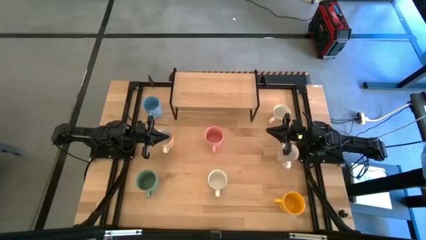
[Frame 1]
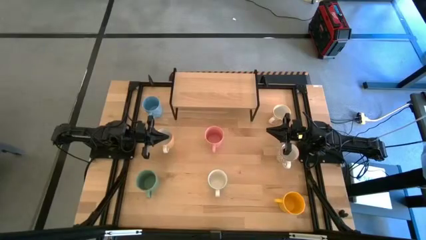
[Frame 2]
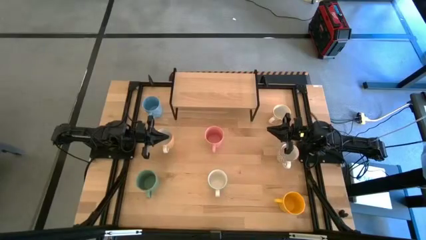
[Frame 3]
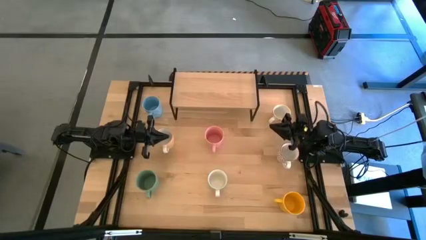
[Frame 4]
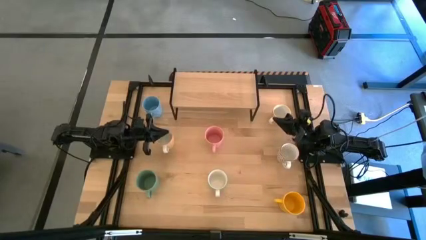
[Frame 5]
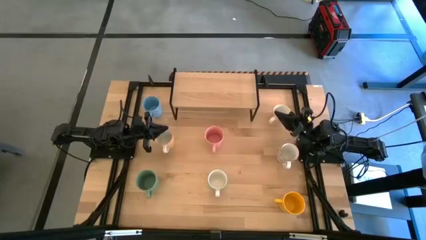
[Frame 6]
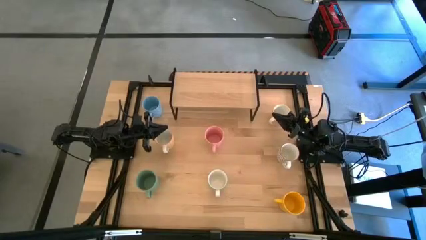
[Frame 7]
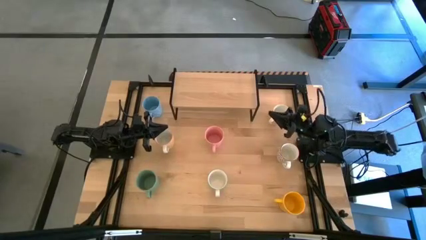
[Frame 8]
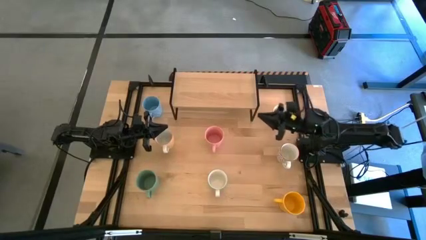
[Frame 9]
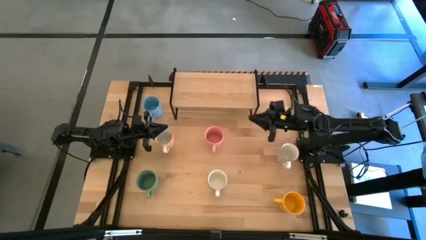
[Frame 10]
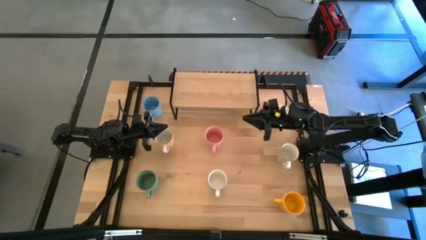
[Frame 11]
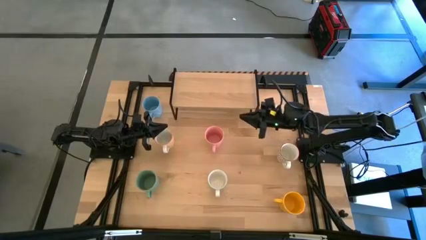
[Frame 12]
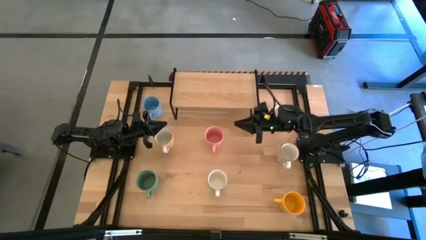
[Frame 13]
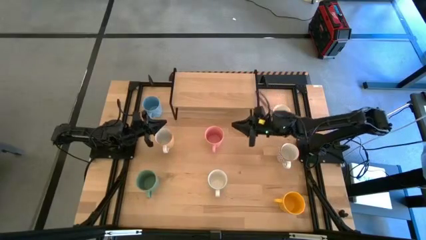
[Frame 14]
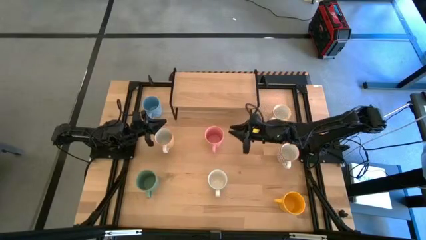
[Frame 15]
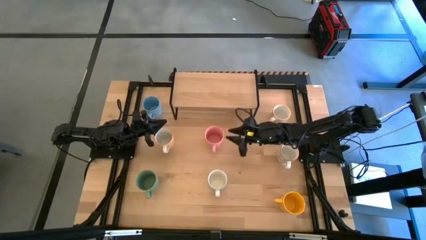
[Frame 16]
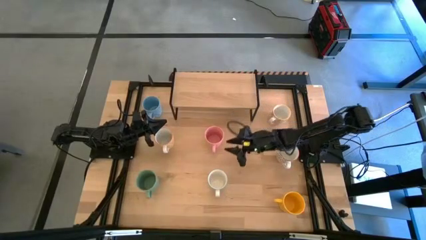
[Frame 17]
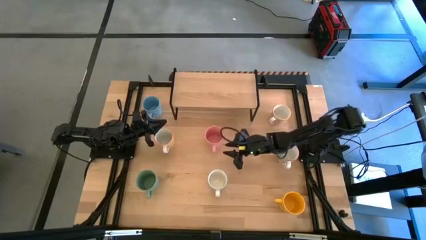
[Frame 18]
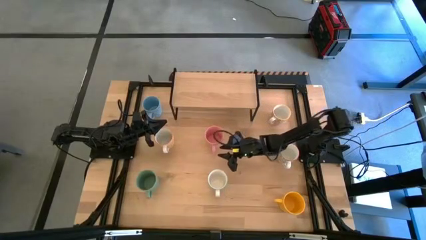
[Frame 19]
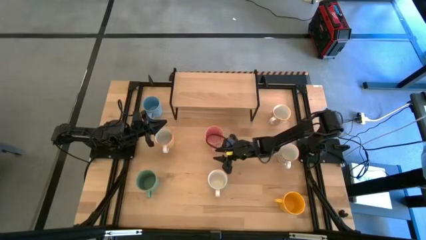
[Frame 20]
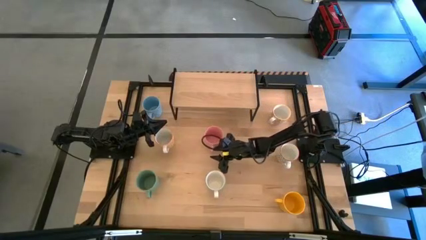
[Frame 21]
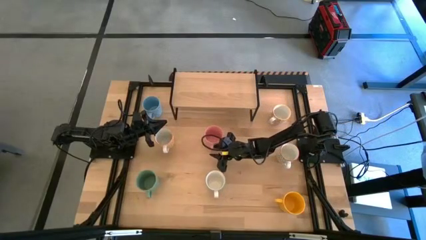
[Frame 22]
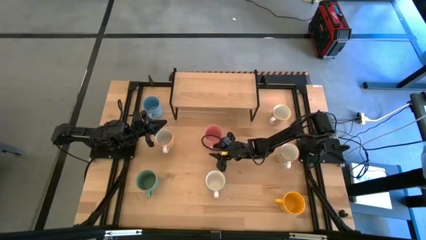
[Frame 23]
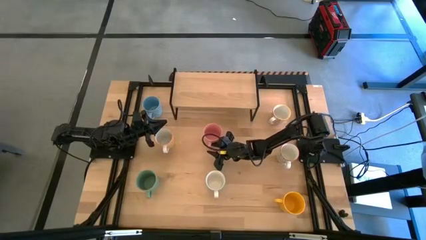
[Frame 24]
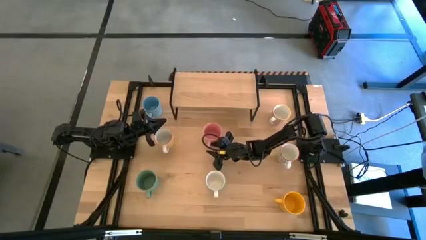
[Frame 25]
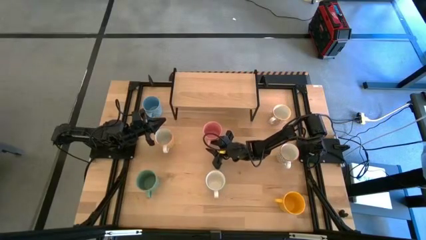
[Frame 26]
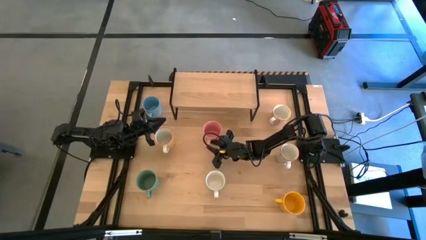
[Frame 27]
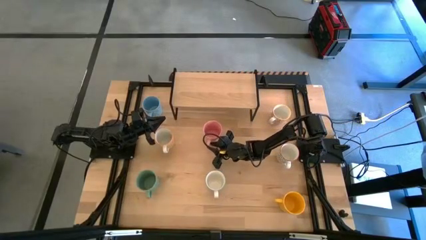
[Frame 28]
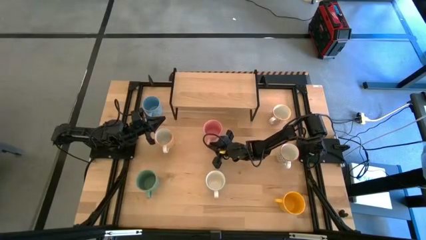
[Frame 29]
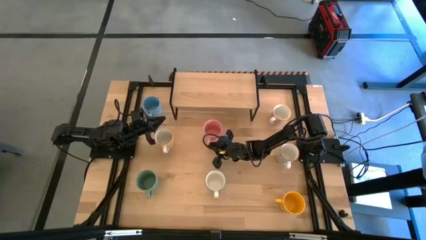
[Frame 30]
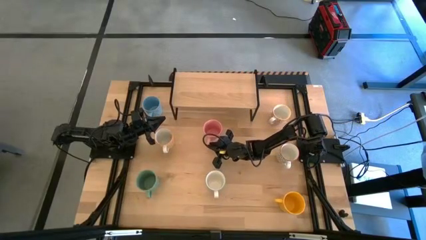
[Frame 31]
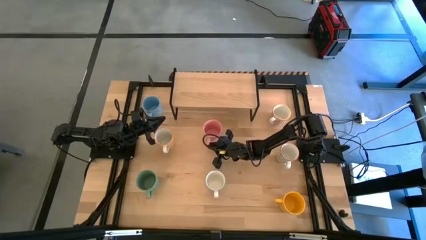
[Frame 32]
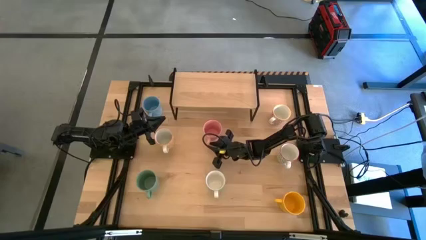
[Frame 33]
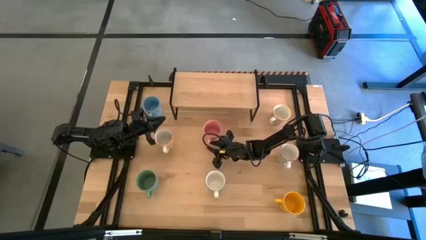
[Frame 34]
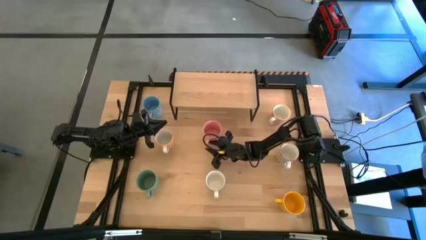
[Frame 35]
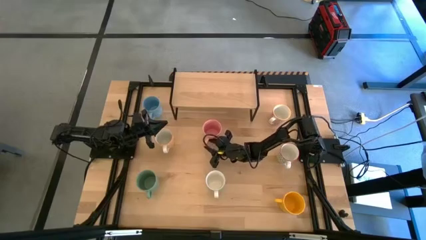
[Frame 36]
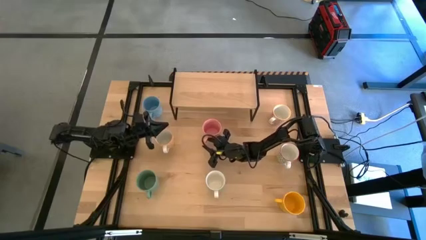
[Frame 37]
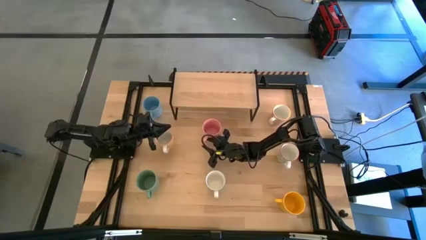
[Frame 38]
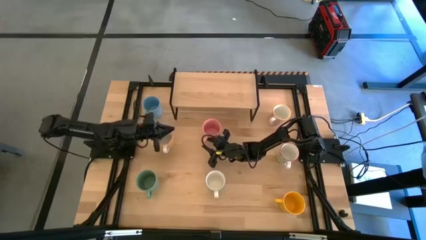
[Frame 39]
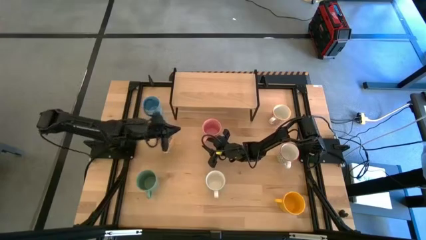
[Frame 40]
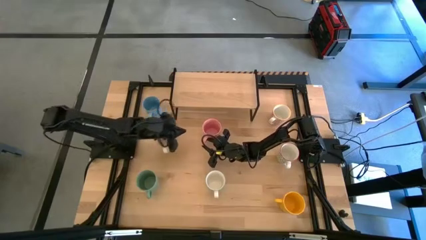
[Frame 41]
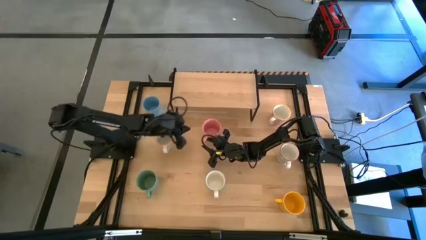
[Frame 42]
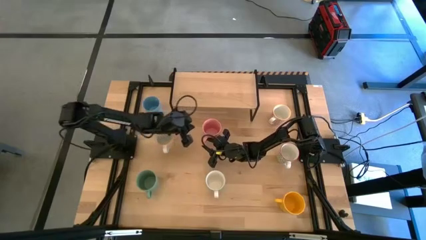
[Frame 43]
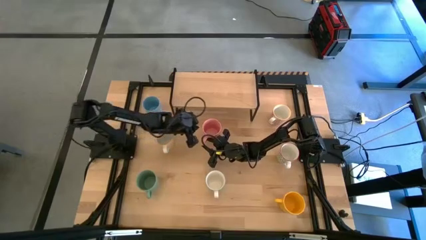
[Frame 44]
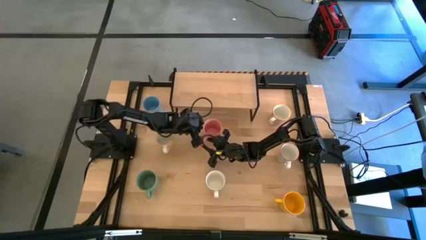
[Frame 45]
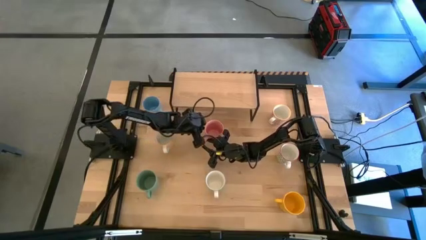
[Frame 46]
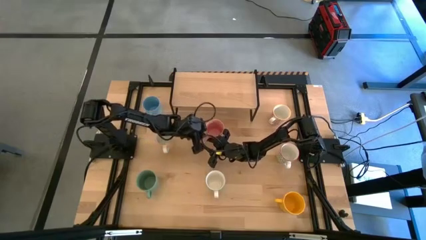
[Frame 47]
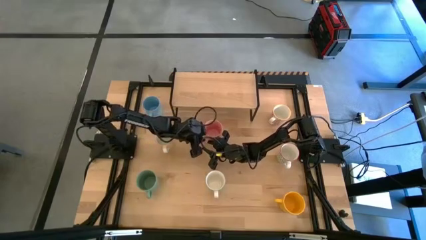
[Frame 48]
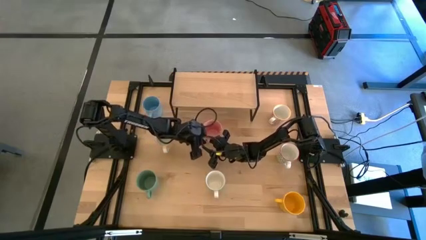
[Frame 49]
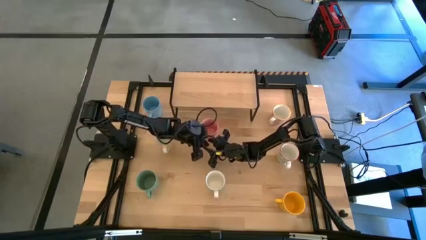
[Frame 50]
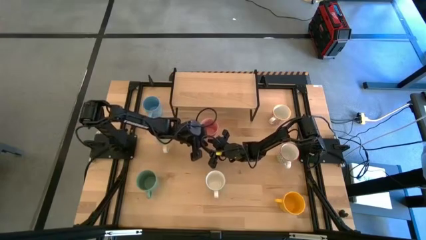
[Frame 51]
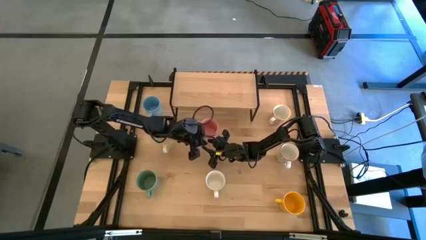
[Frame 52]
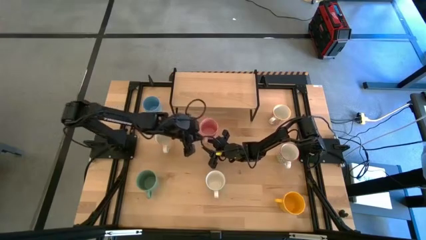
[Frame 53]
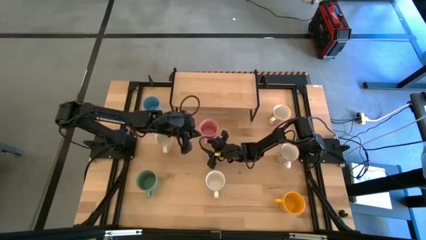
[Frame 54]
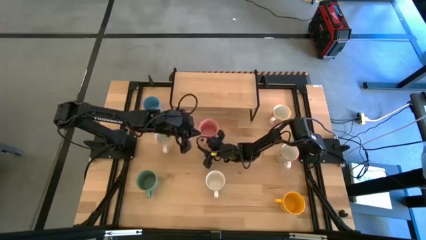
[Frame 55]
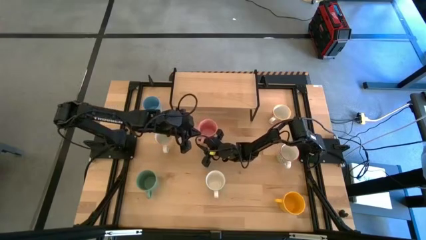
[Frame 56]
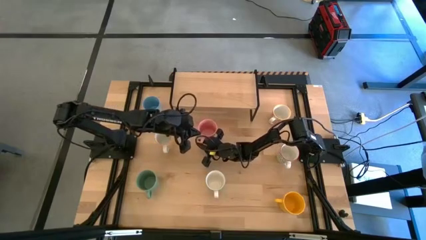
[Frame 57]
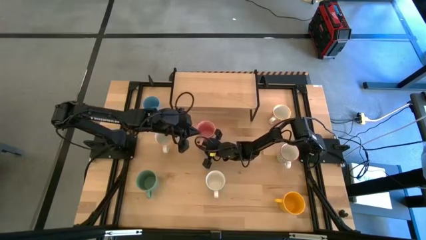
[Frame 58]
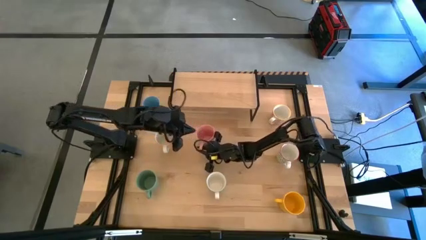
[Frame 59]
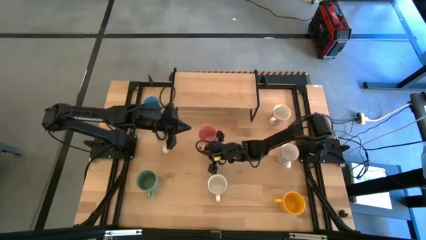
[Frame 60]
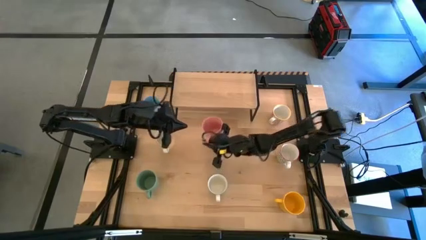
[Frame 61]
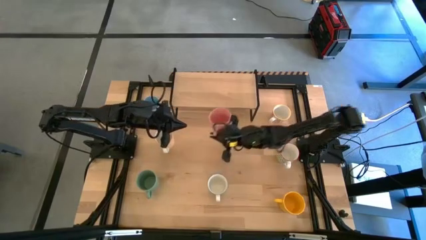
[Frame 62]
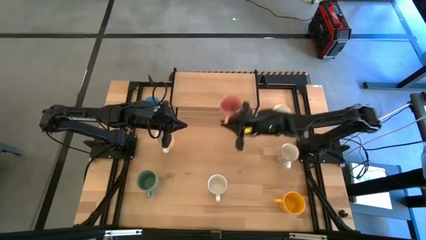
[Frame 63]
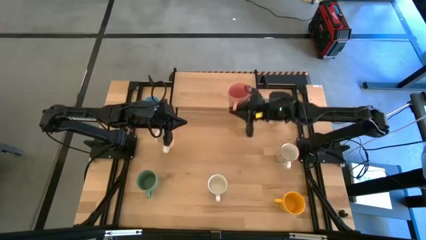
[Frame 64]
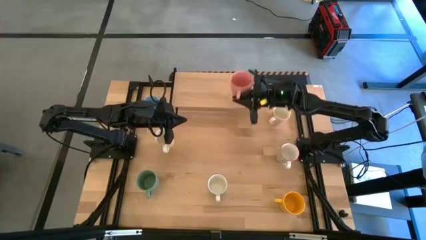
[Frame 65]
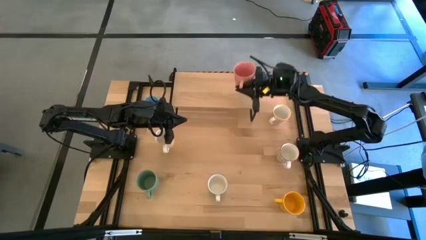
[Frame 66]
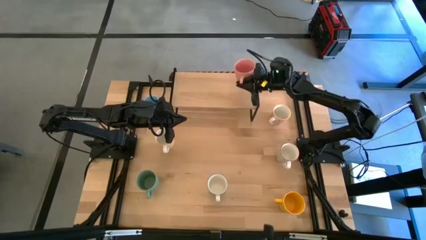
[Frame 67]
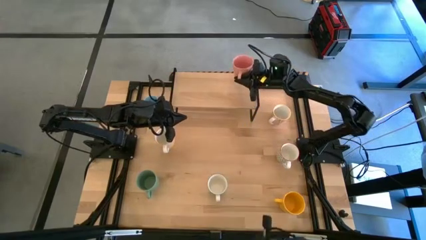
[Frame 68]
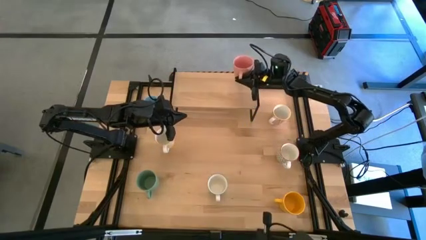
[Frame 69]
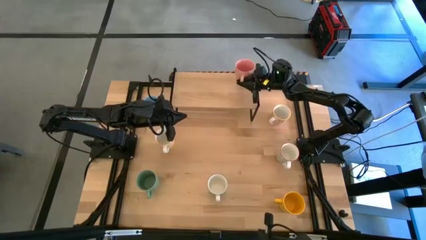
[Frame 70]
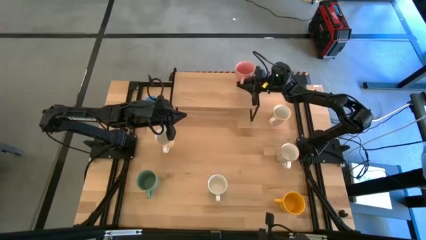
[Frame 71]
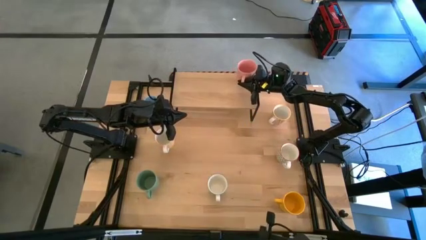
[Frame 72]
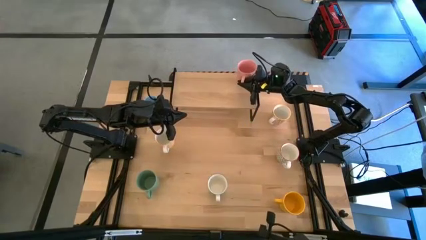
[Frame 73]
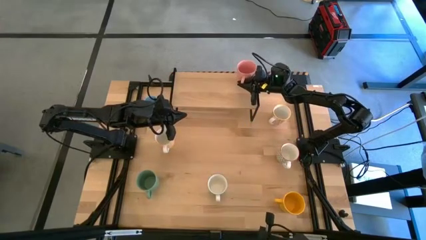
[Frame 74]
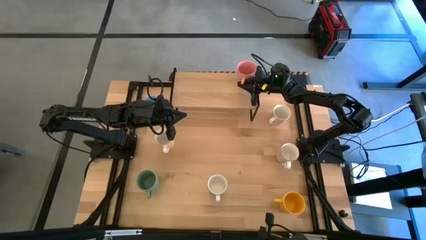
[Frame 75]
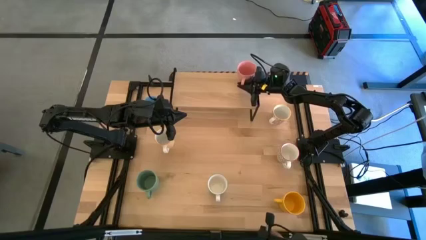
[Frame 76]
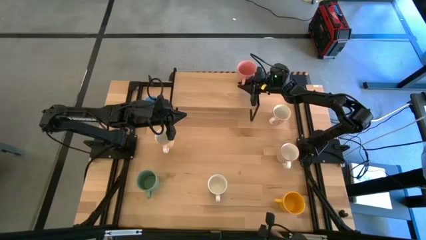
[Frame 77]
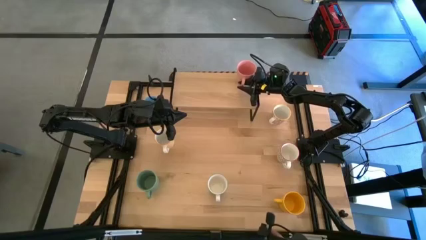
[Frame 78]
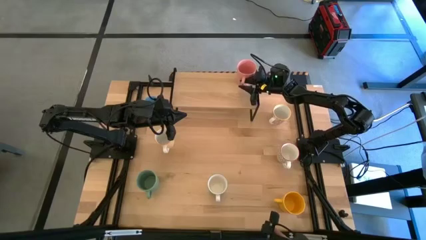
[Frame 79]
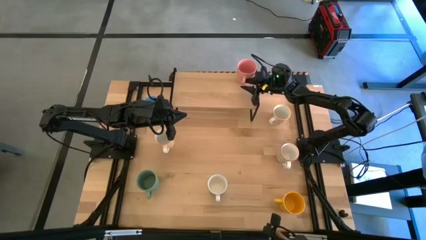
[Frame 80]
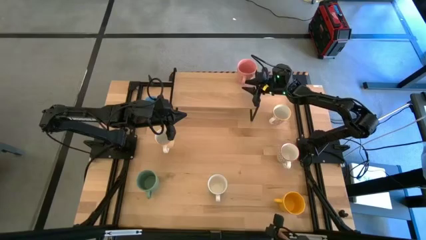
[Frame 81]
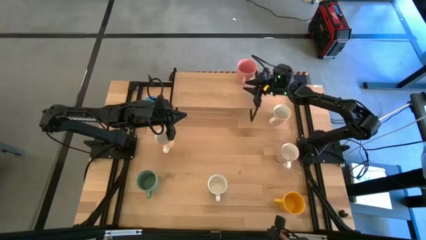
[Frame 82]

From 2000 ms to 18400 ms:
Task: Place coffee mugs
Put the pink mug on the shelf
